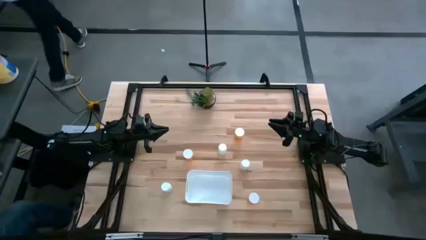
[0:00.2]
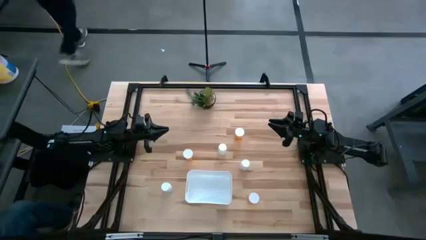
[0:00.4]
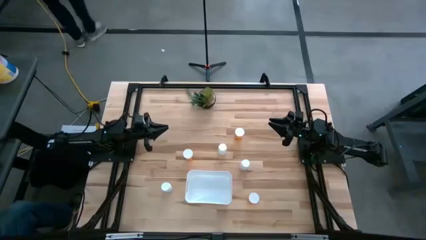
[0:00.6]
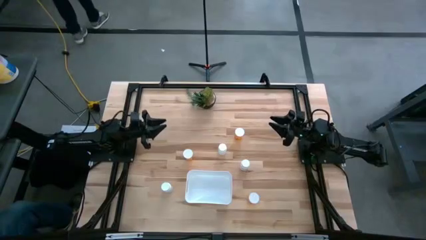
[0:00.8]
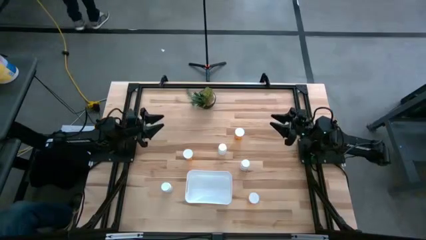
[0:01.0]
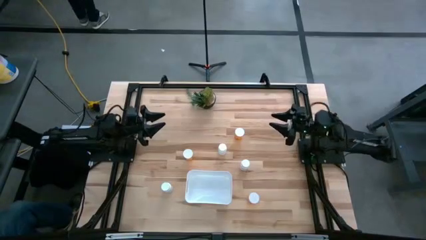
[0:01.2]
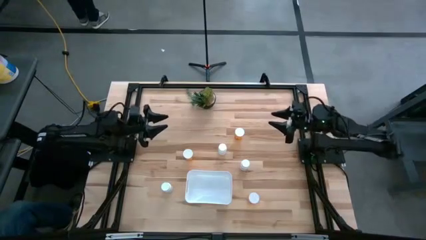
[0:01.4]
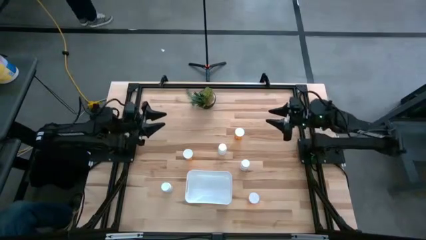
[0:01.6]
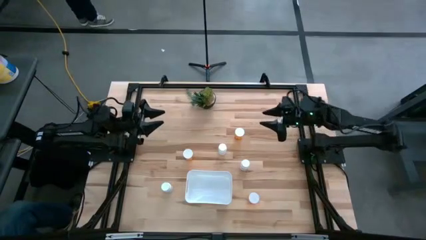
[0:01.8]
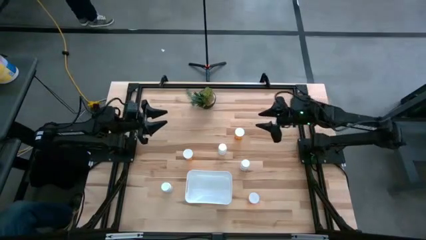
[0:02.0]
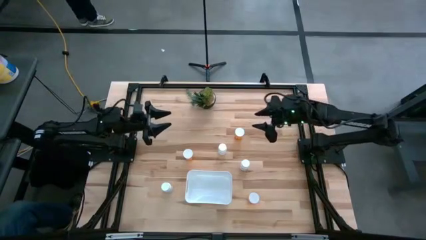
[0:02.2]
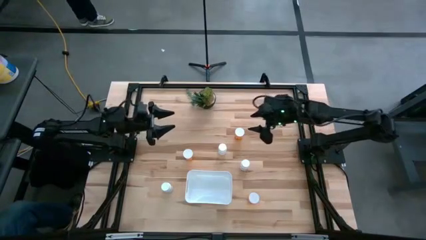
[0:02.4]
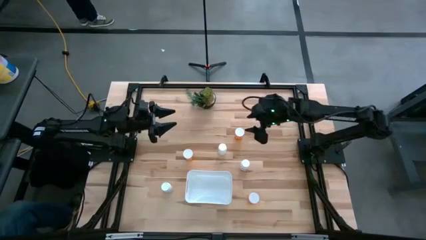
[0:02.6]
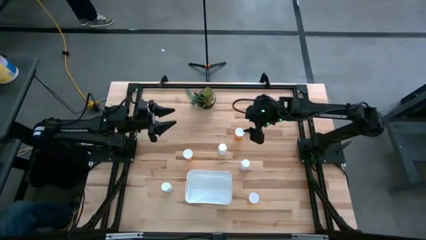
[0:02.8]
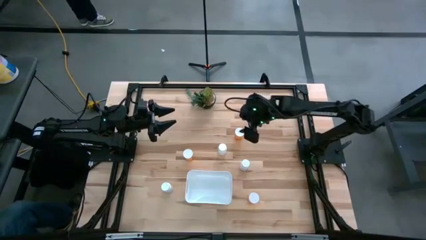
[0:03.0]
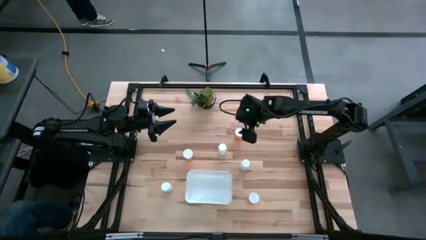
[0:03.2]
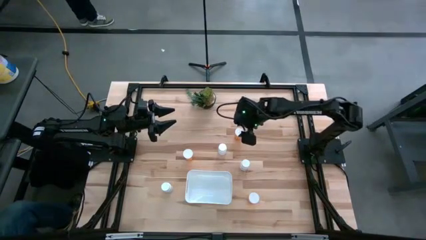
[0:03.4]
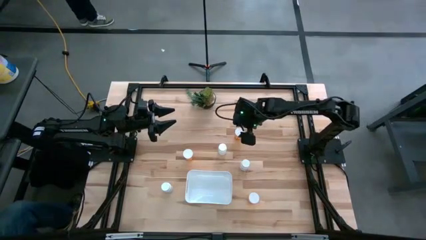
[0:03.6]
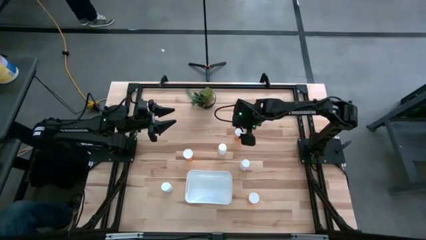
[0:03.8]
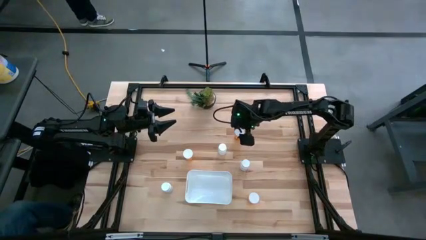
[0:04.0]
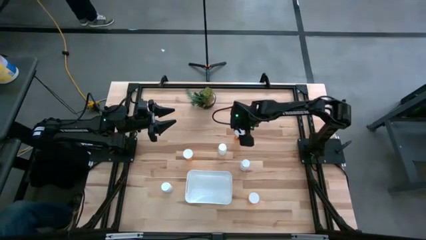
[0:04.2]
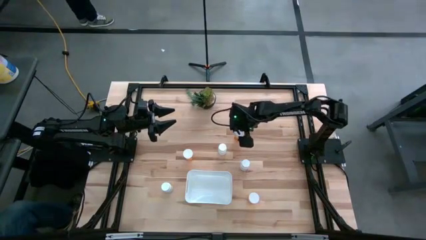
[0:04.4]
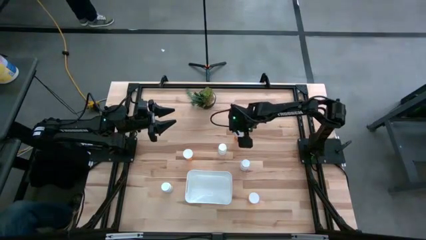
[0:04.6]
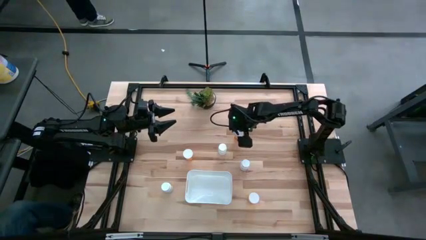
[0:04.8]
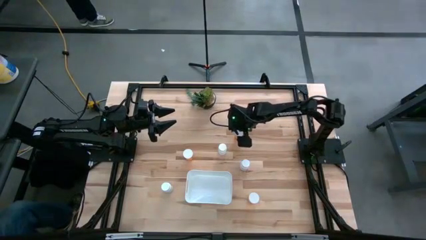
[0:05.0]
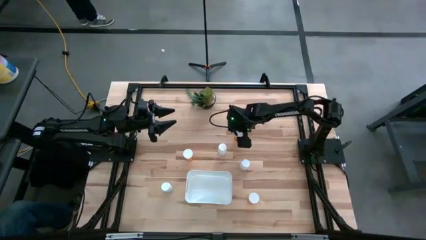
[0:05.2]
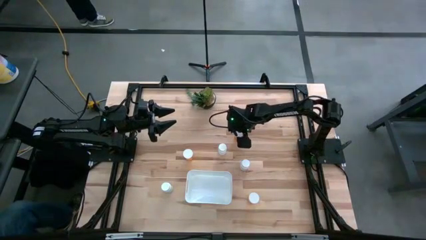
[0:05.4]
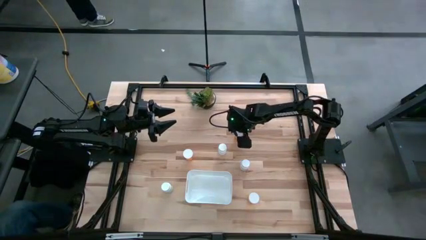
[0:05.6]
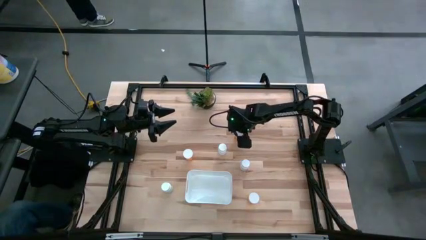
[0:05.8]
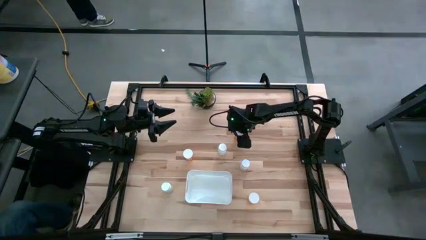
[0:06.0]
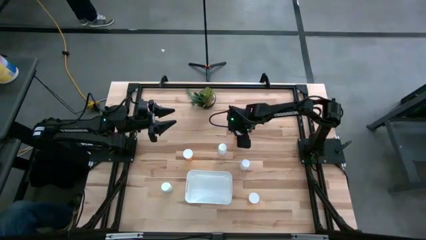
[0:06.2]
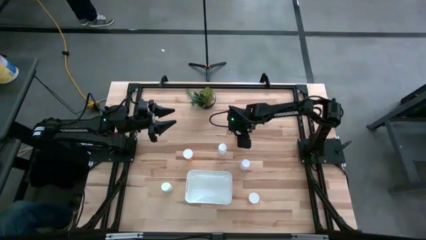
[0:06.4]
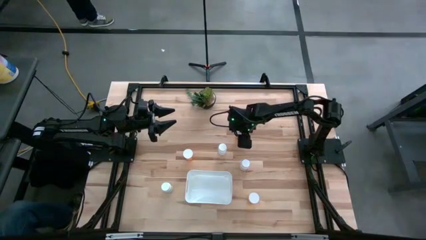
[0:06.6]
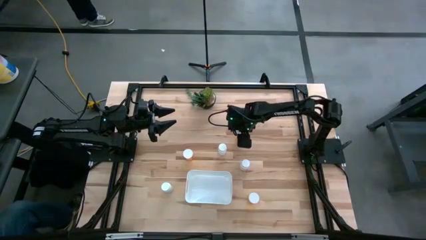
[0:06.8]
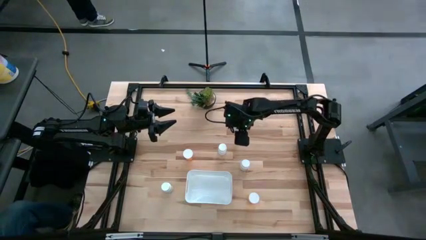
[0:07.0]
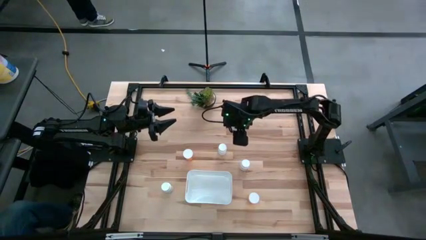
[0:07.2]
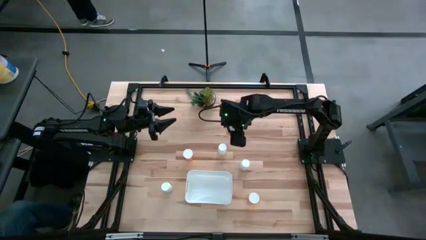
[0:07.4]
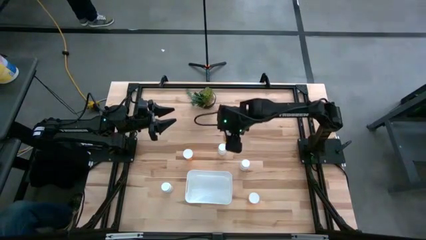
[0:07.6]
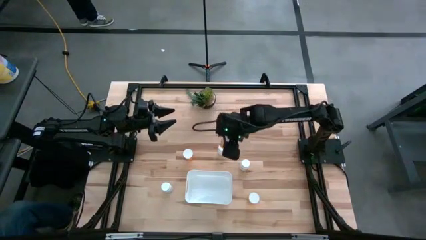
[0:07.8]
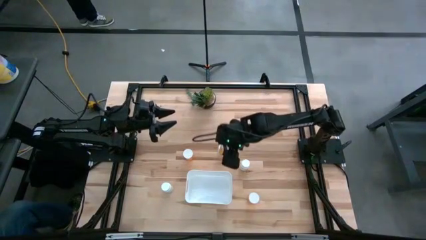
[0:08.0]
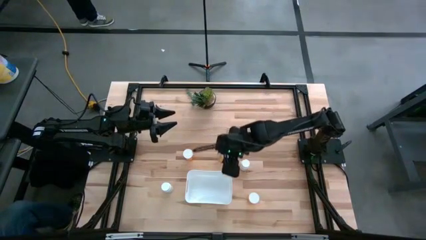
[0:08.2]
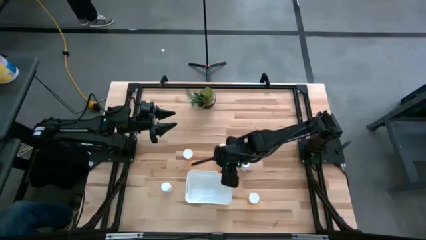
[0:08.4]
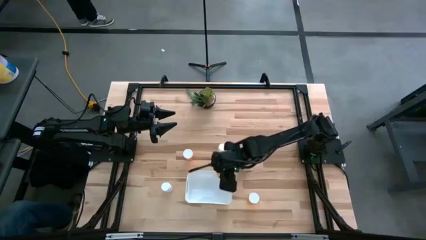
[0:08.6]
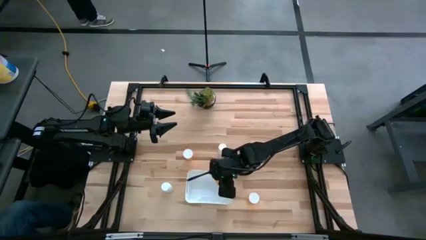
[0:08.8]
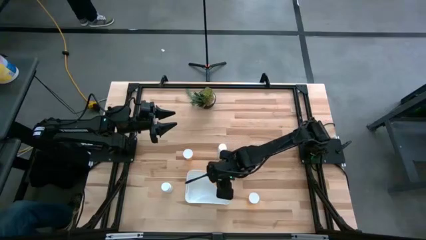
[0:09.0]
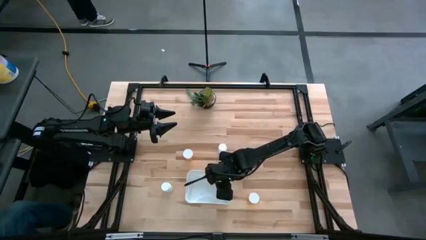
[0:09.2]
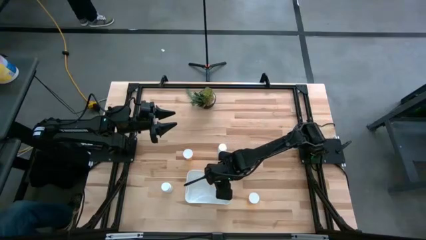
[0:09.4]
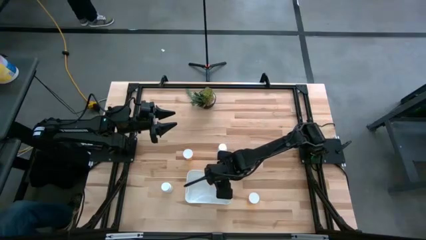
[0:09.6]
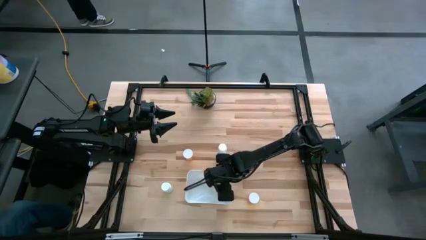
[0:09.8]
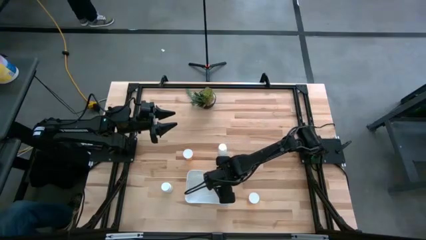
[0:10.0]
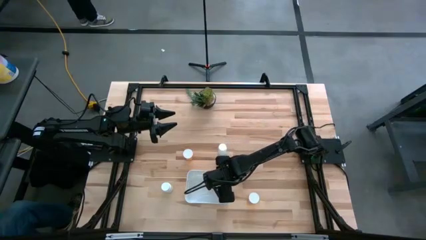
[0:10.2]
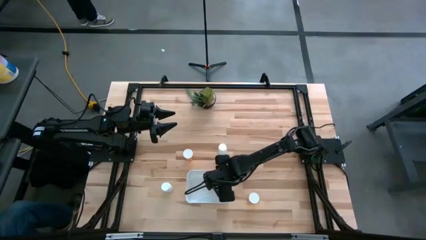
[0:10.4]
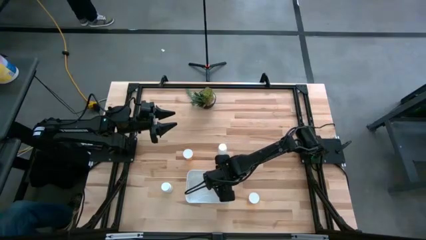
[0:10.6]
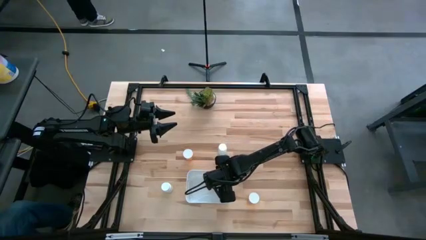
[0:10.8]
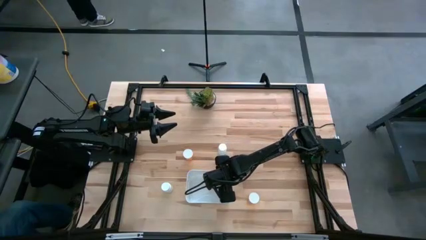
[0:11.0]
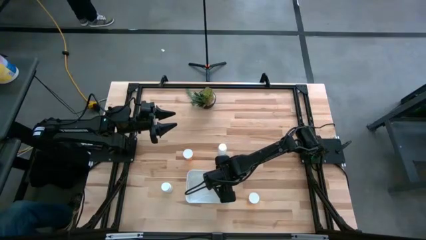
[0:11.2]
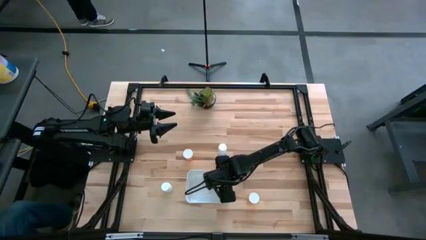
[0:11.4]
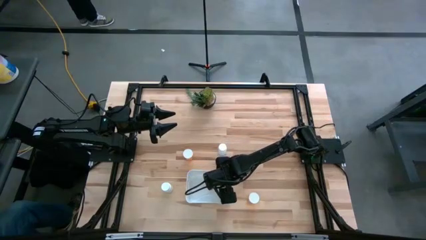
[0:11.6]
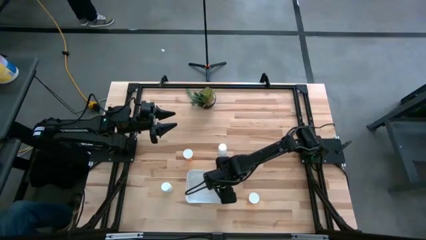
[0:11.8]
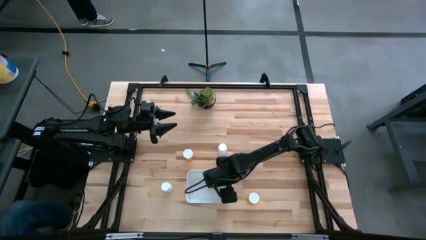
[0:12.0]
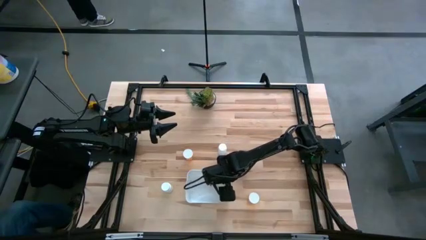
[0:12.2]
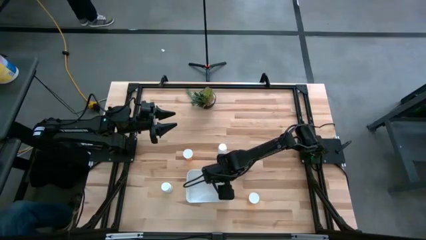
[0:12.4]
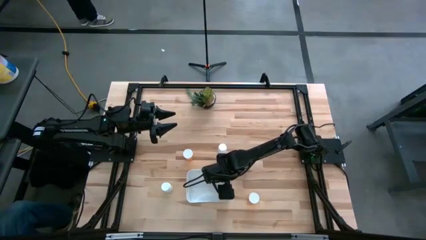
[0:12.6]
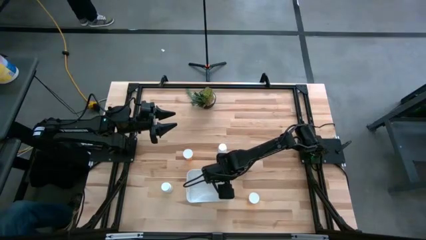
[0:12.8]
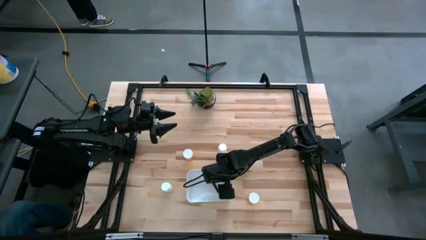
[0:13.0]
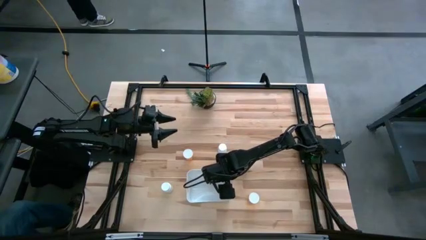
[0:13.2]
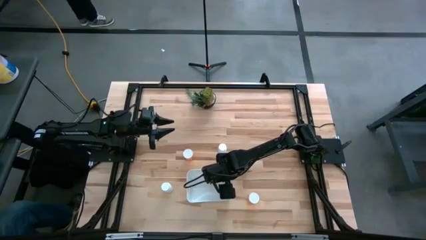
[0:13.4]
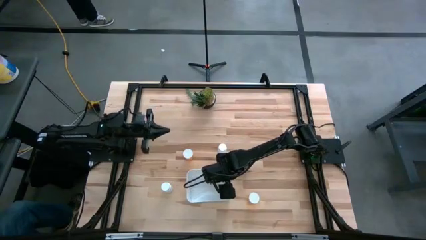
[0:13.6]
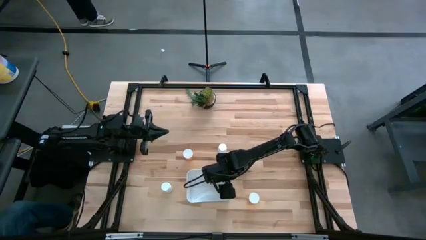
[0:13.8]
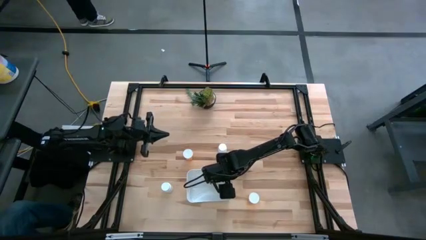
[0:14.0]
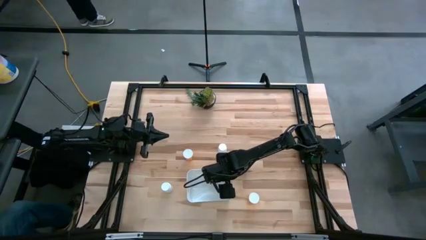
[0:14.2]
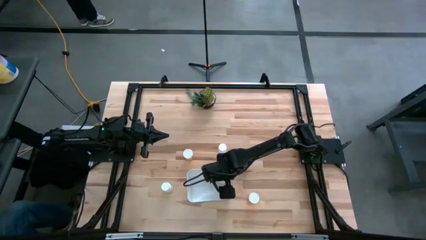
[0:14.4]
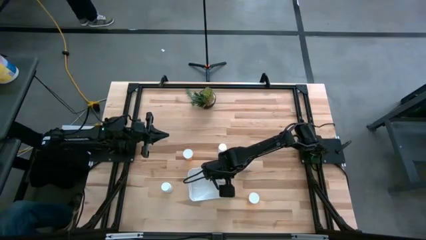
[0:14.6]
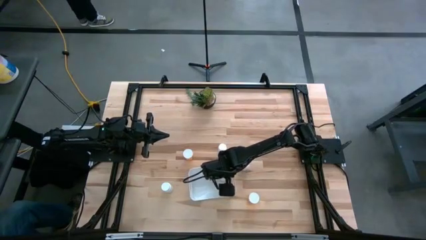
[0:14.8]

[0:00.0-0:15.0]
Task: Pick and place pill bottles into a basket
Put the top orange pill bottle into the white bin
